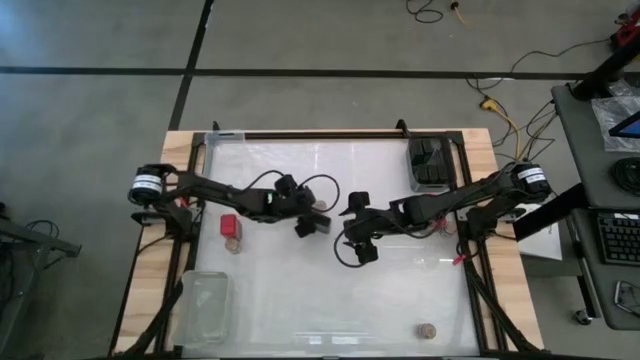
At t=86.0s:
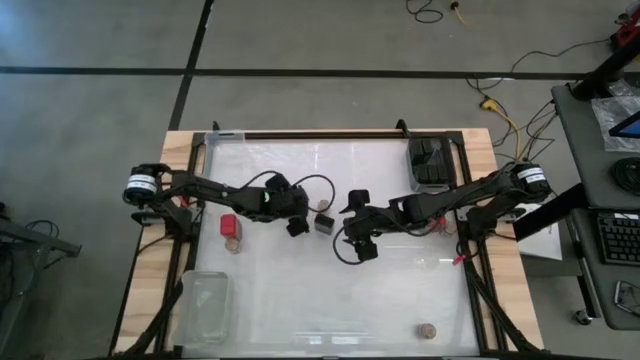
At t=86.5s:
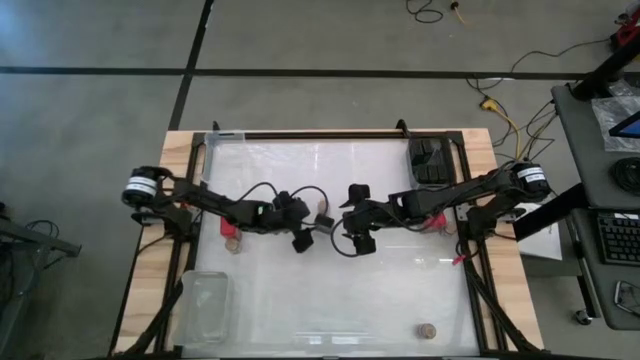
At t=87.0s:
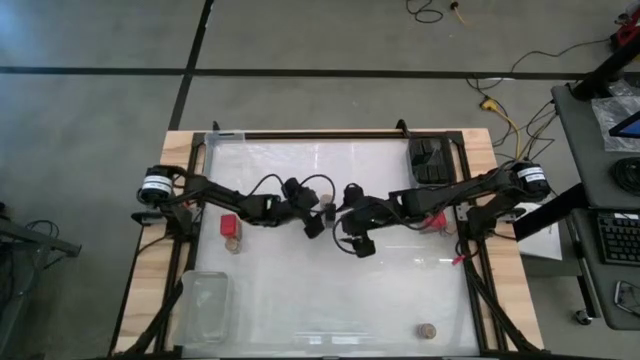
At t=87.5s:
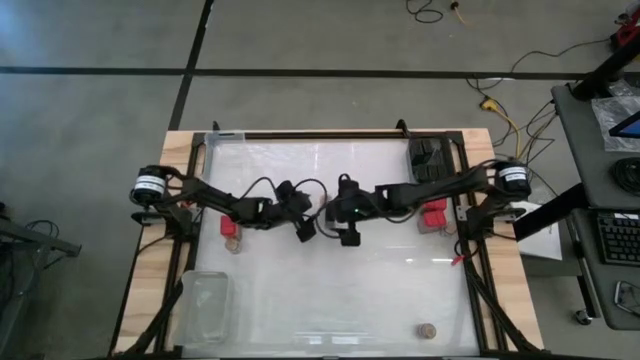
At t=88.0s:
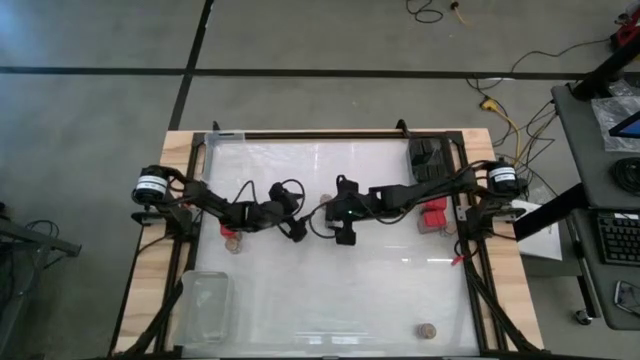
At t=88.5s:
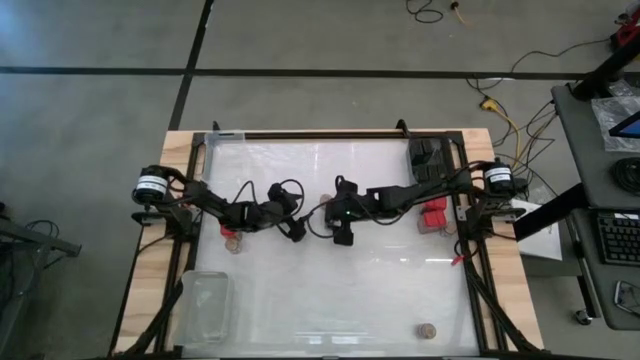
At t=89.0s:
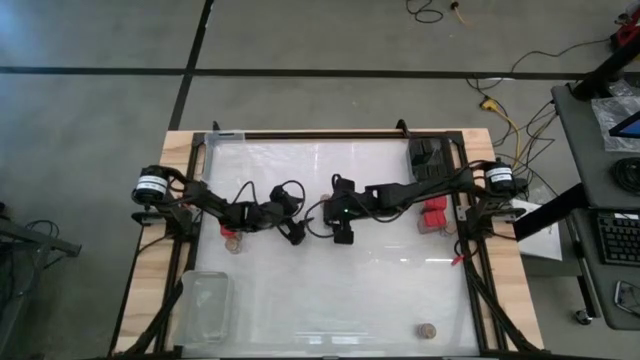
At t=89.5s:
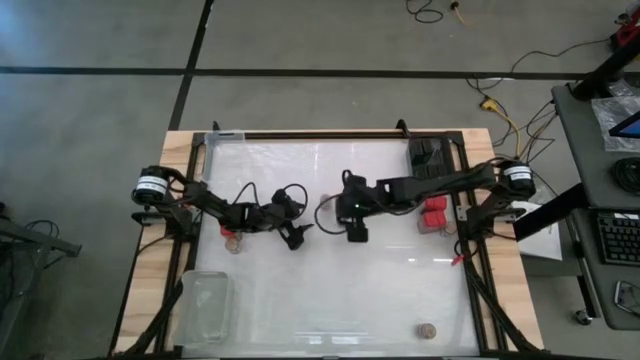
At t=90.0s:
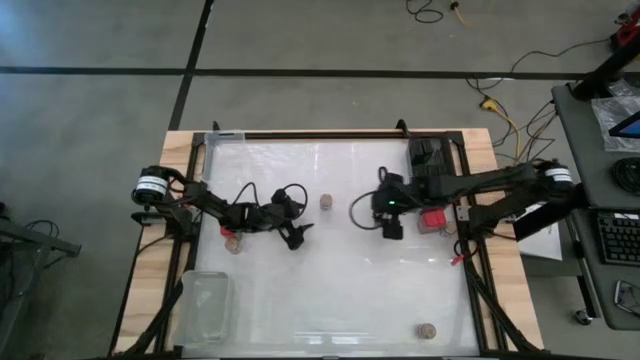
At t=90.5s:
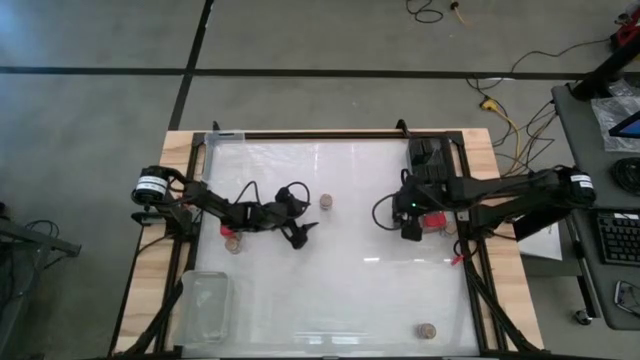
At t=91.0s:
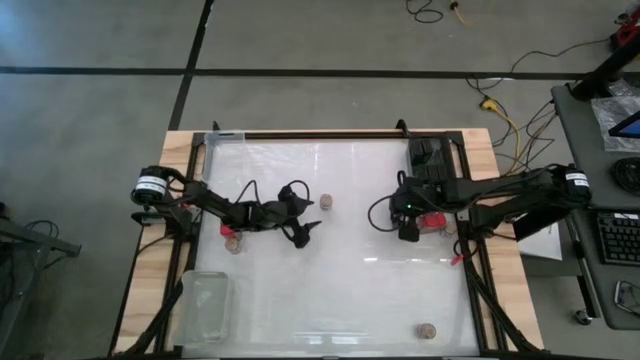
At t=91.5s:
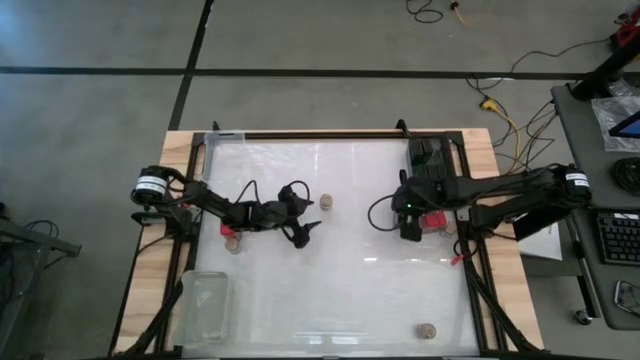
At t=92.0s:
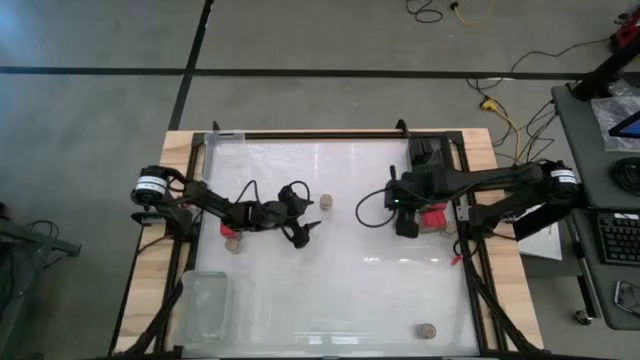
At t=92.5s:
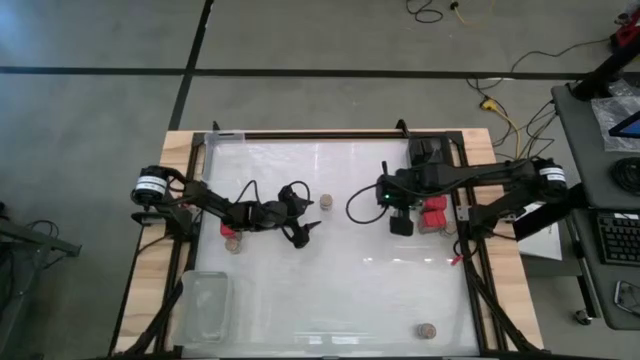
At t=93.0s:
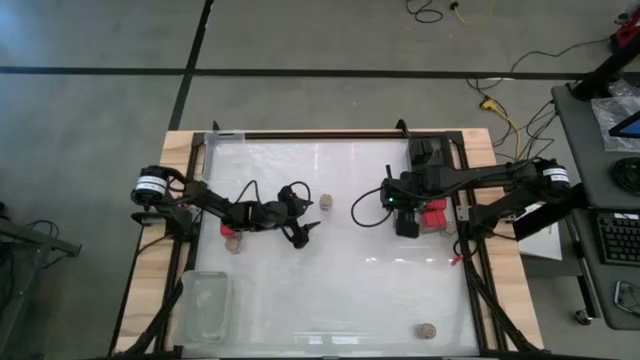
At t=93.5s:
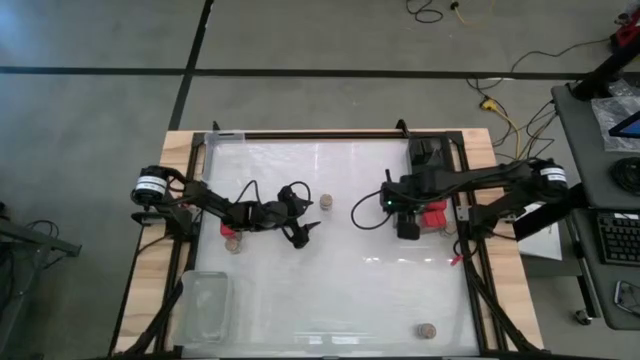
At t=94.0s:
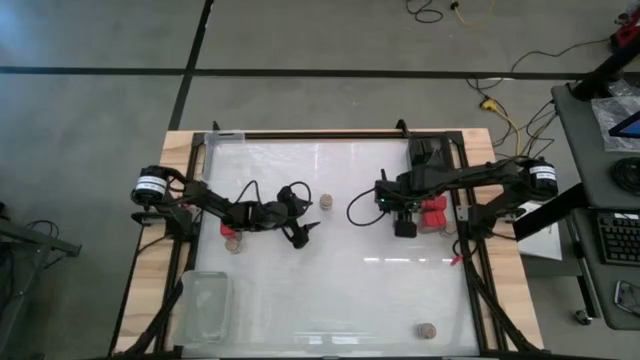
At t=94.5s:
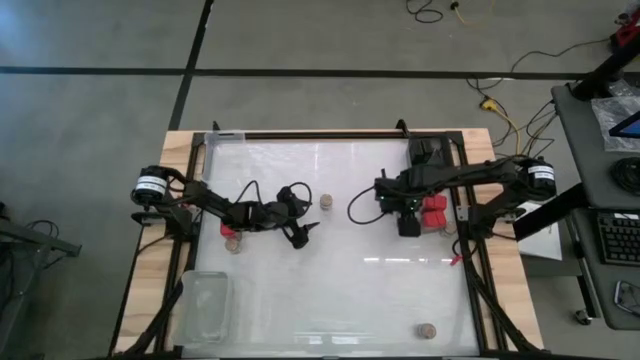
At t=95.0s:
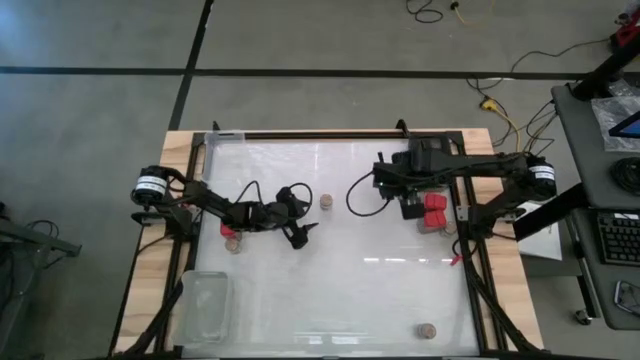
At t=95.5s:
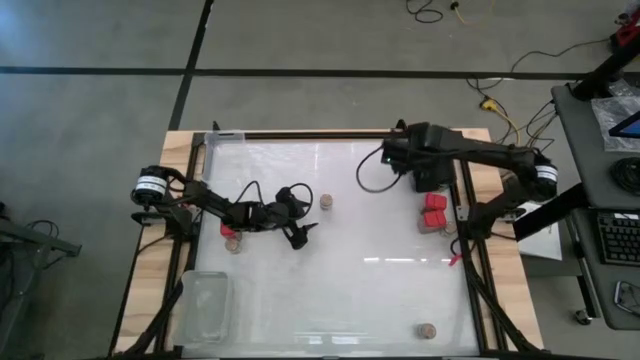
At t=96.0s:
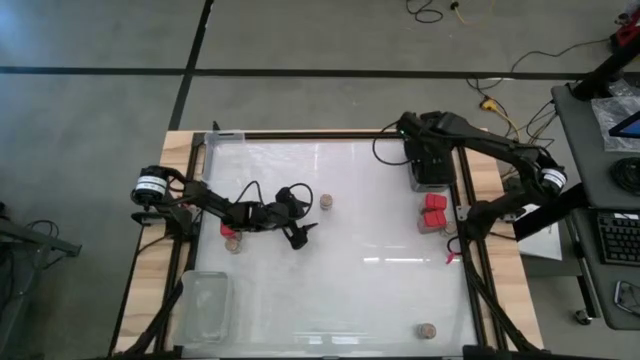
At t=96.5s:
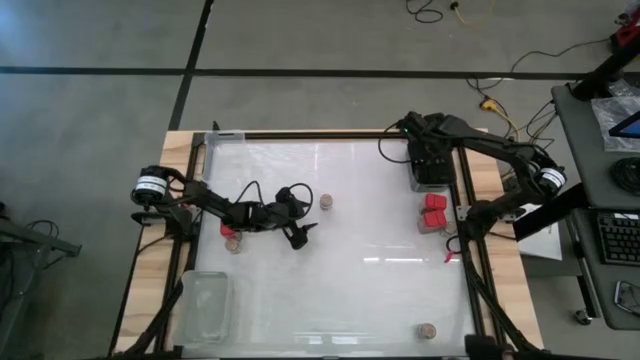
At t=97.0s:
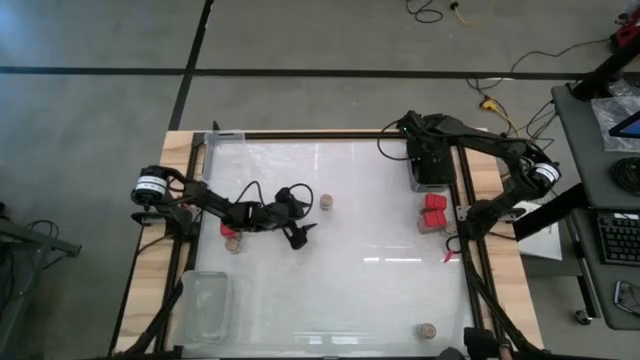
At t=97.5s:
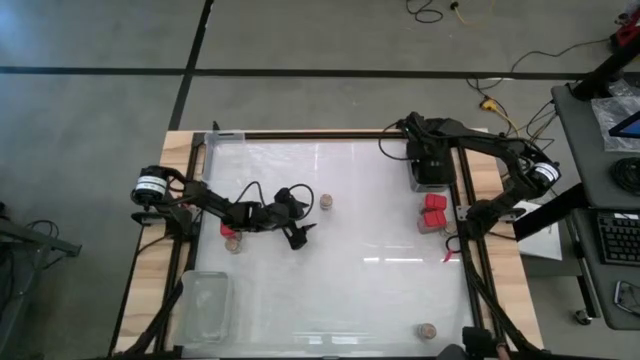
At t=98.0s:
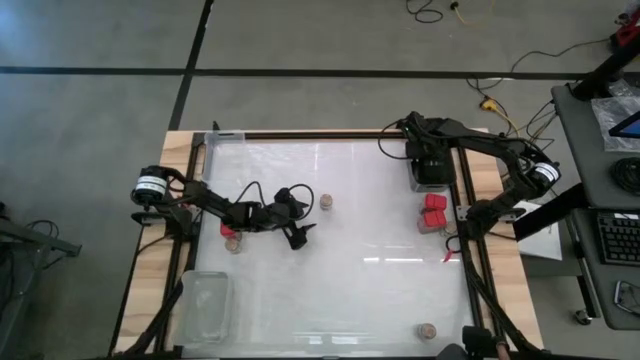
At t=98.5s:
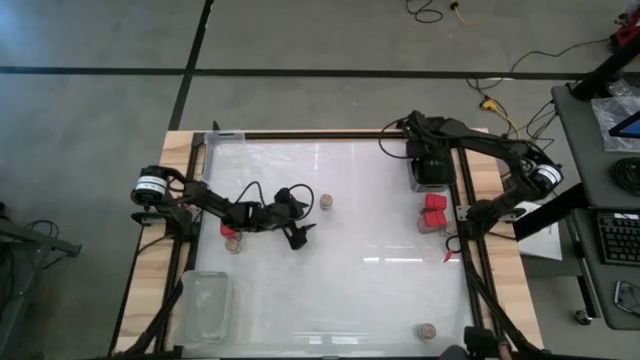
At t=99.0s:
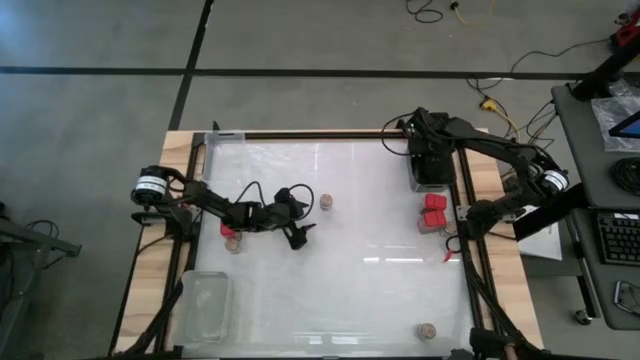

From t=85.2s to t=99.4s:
Task: Sort spices by type
Put the black seasoning can into the black bin

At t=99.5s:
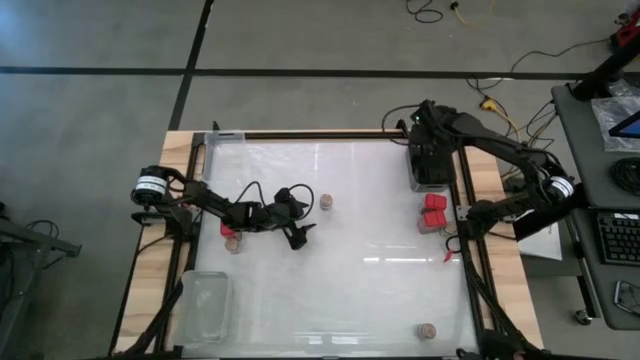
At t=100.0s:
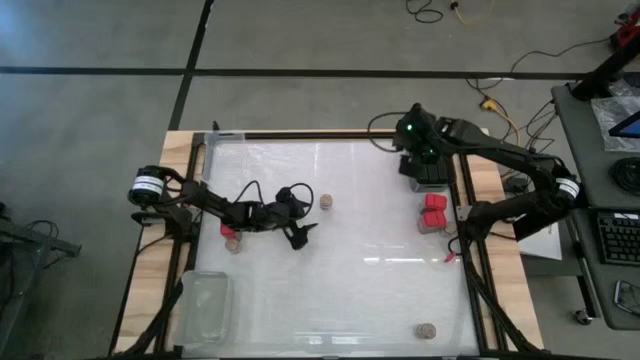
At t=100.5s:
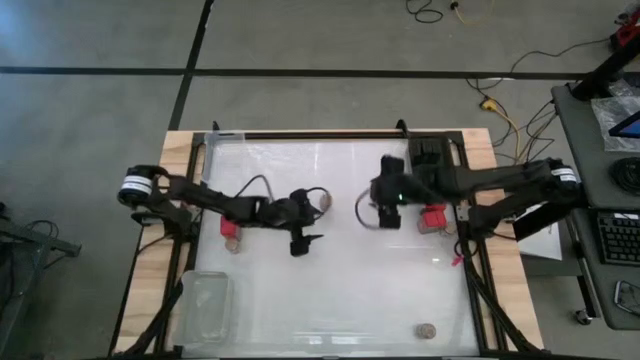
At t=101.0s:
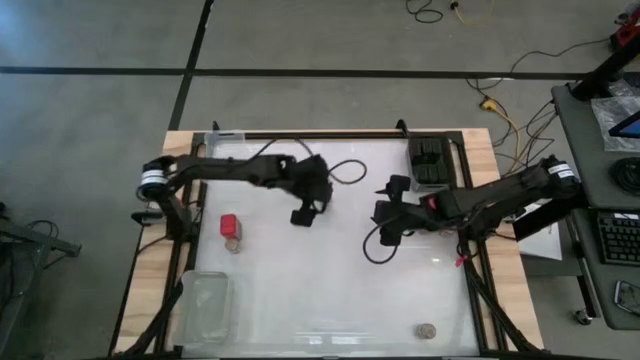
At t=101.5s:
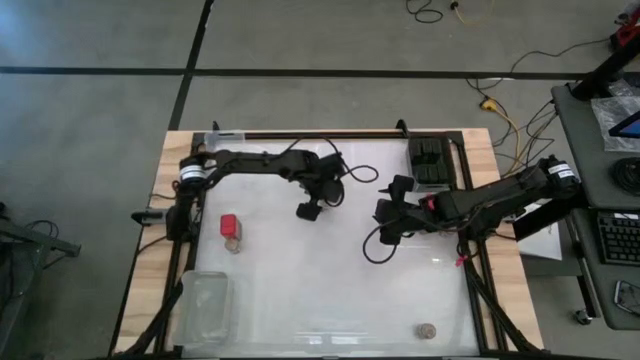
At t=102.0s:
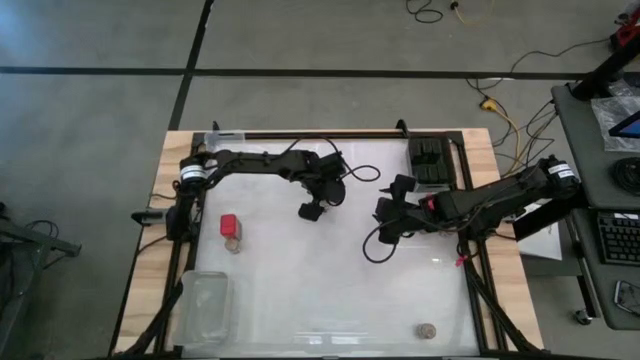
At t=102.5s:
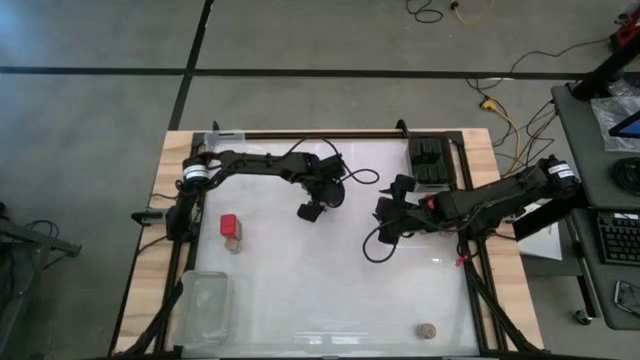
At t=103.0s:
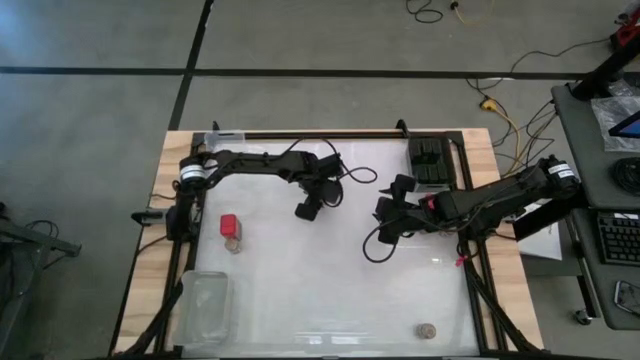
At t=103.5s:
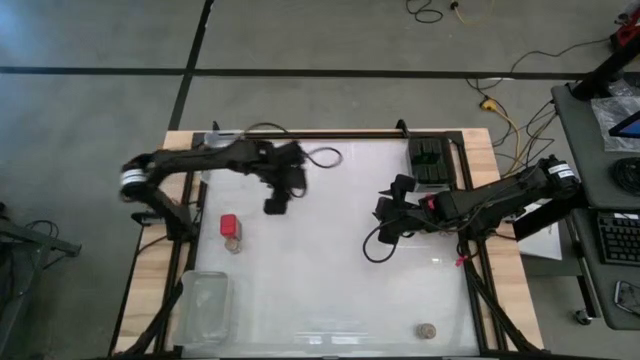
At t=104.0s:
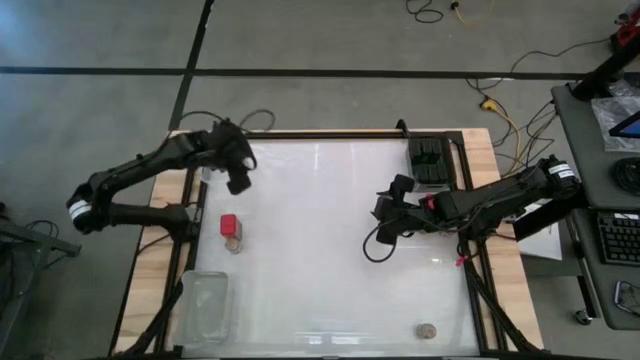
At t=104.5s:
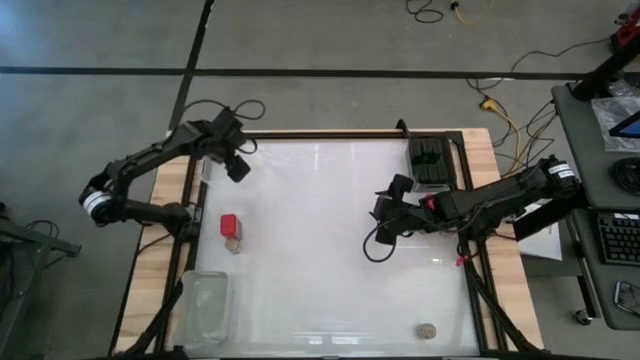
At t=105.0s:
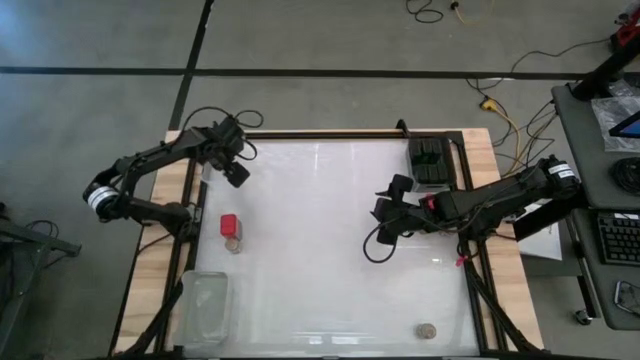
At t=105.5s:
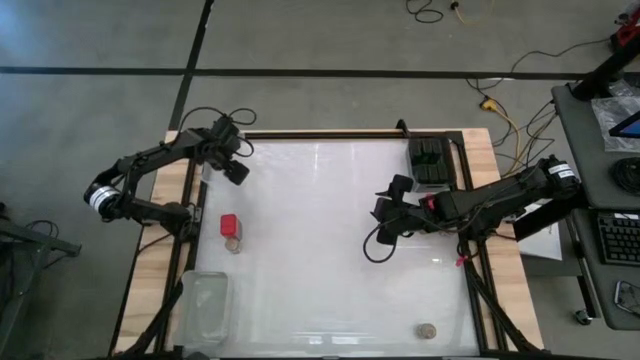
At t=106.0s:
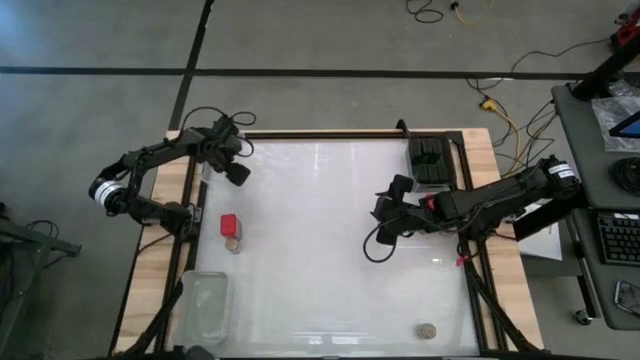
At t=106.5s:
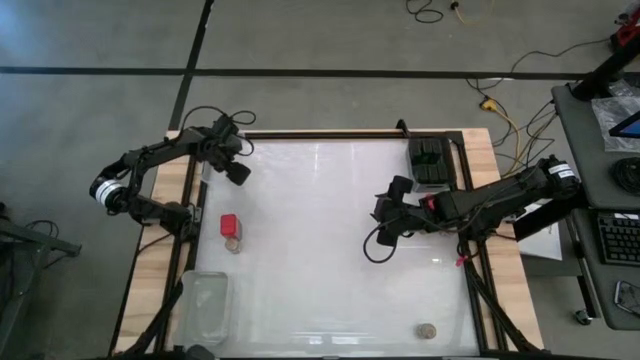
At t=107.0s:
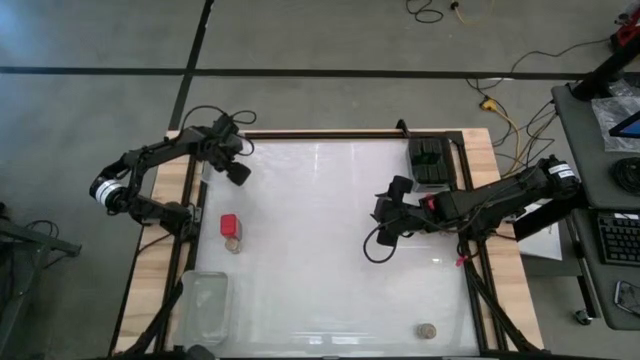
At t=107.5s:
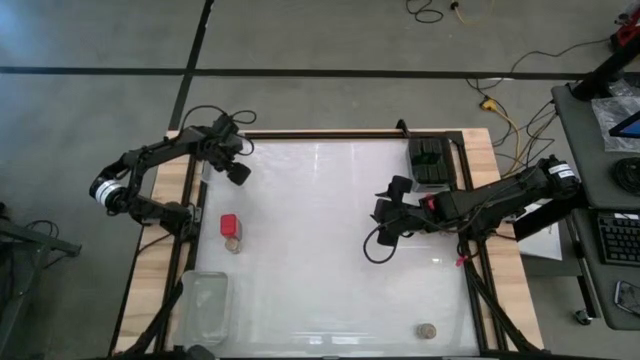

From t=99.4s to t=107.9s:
Put the brown seasoning bottle into the transparent bin
